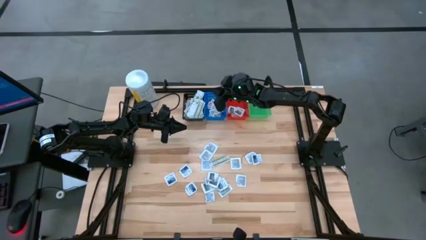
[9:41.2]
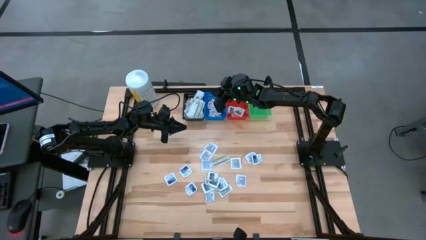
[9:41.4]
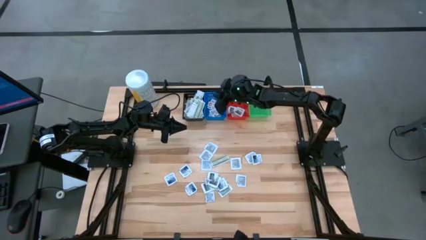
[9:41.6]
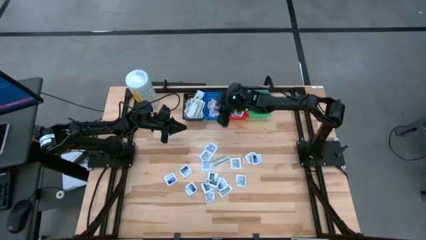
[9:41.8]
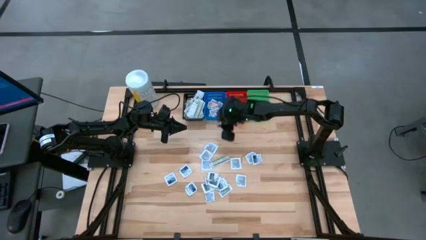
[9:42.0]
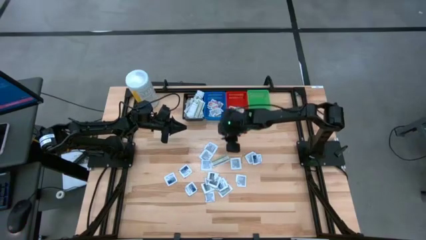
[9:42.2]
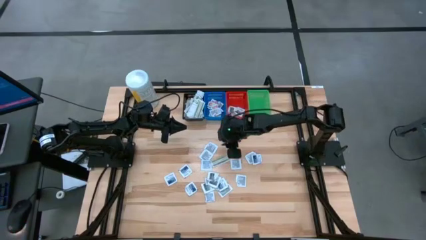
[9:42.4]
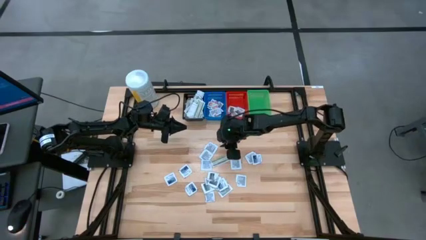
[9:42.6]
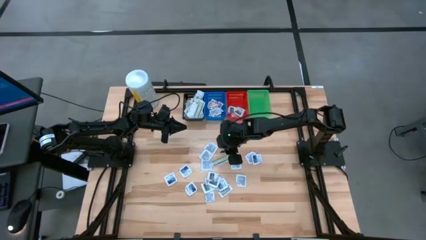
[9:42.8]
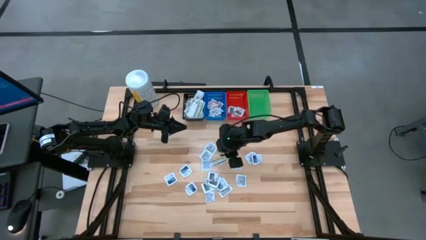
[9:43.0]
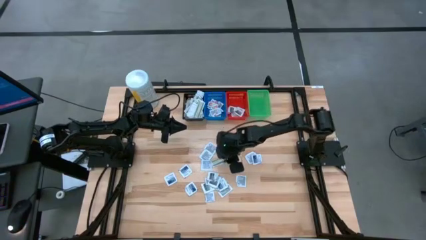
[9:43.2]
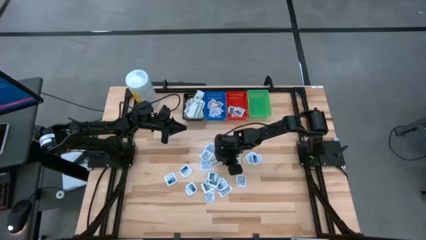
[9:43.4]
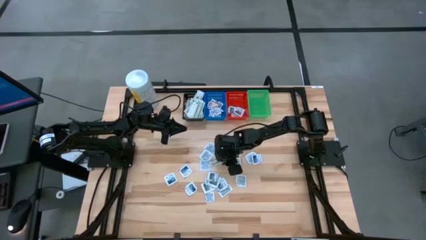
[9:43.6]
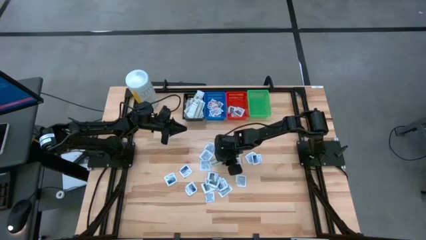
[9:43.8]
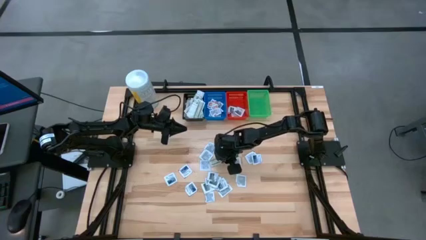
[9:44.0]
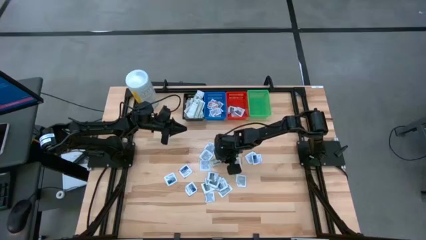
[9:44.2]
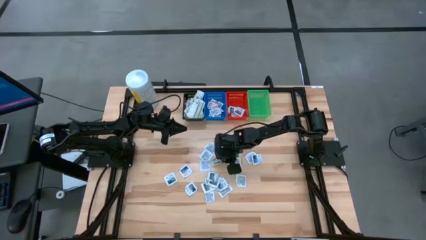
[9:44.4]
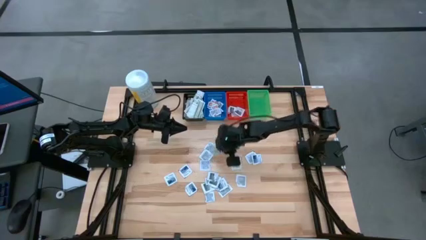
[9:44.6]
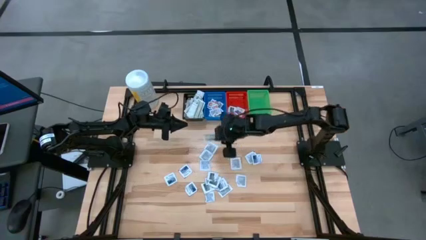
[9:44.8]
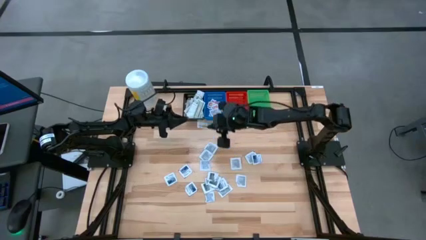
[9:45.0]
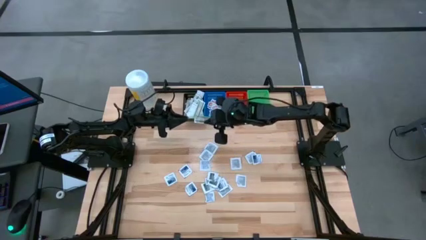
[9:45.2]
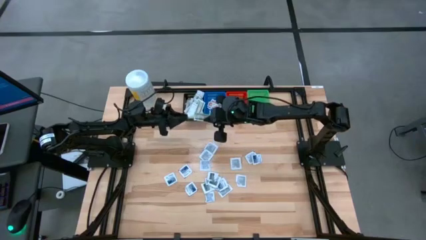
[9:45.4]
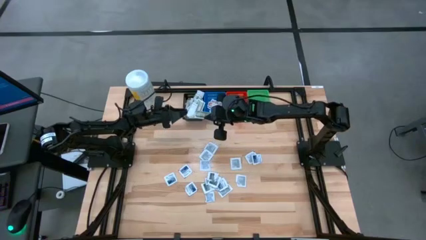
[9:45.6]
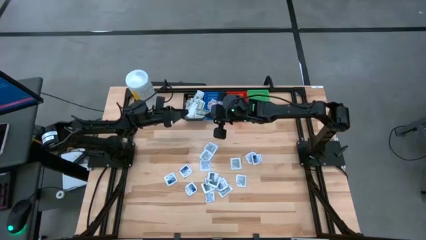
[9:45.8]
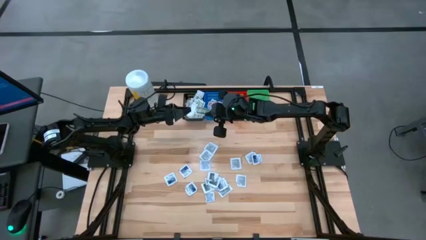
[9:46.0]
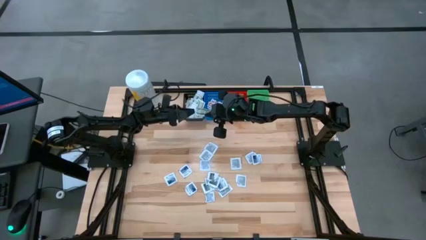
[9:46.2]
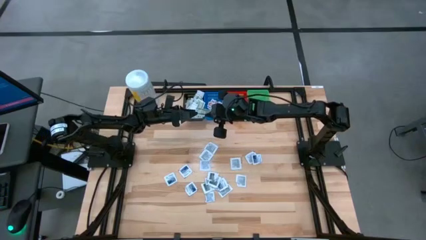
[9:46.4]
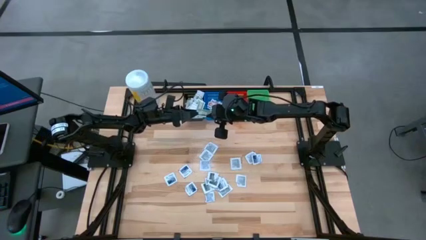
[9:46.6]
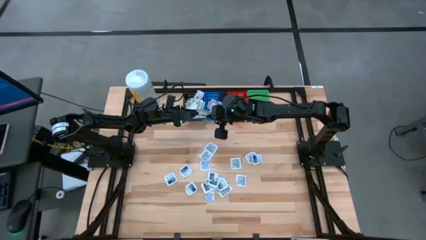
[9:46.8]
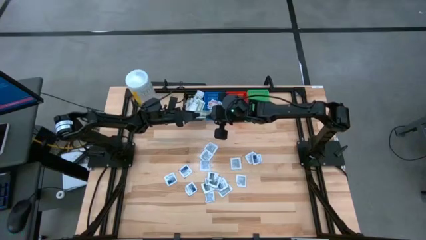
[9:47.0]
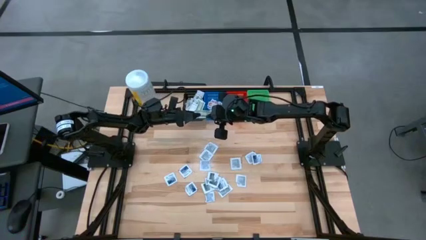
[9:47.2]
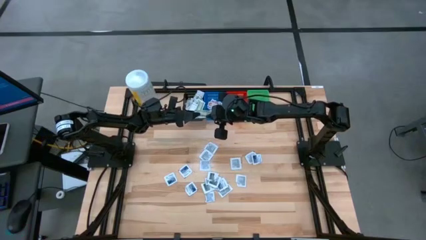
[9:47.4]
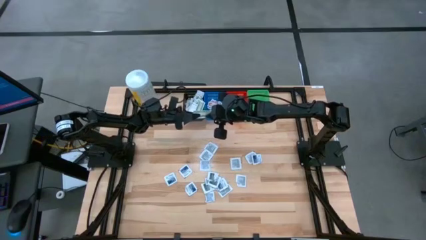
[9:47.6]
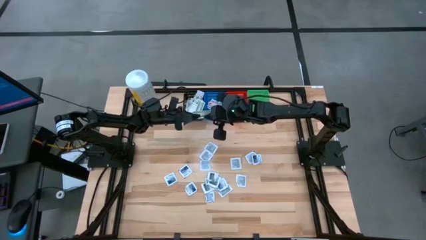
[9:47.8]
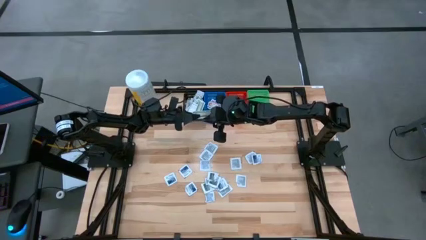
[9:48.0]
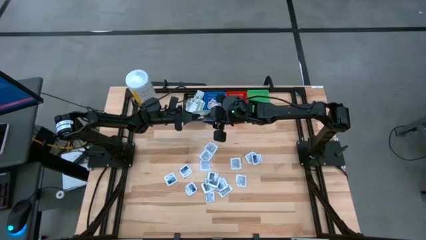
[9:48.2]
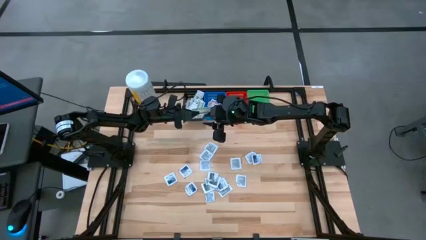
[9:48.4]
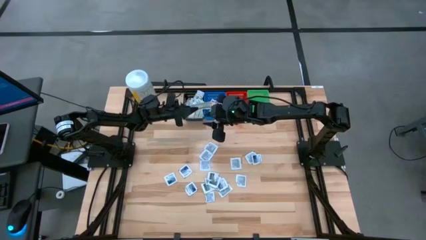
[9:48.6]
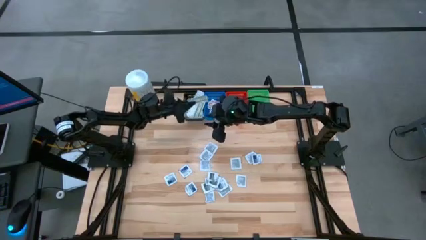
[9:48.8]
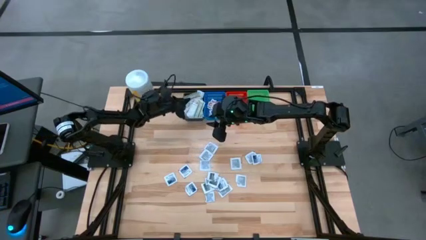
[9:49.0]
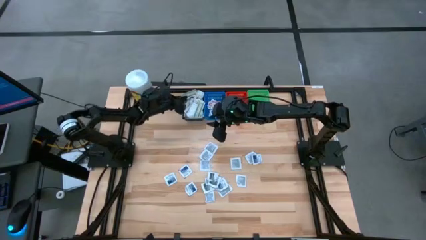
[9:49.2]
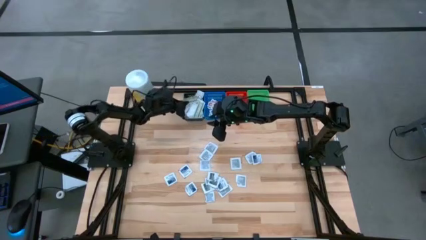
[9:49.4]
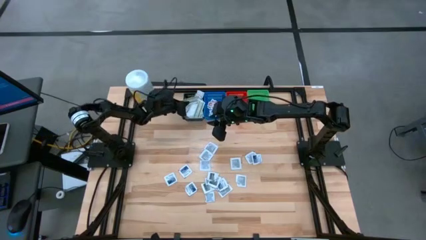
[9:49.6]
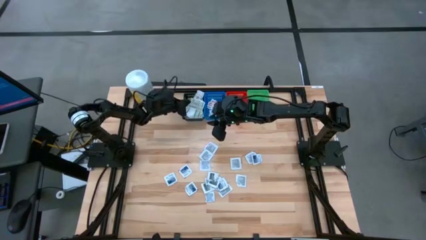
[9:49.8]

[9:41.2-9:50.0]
Task: Pick & Place First Aid Supplies
Put the green bandage pack in the black bin

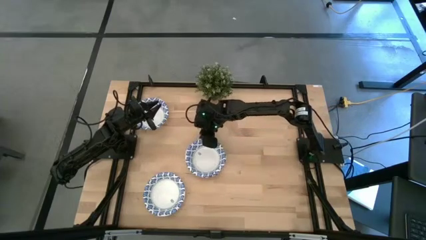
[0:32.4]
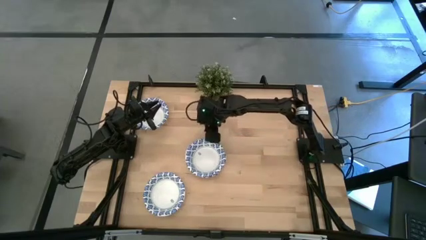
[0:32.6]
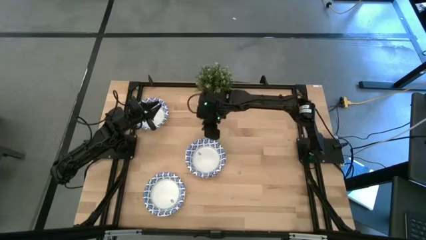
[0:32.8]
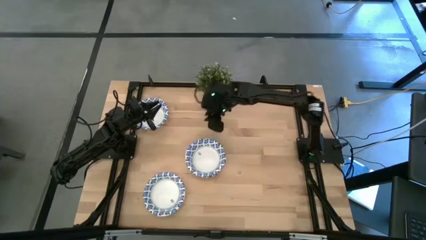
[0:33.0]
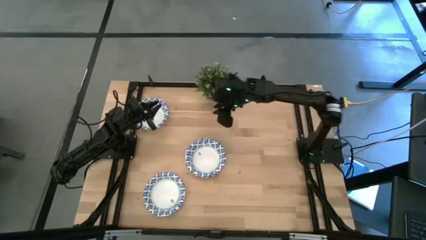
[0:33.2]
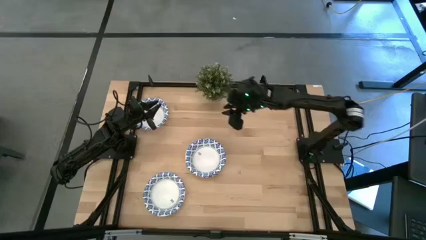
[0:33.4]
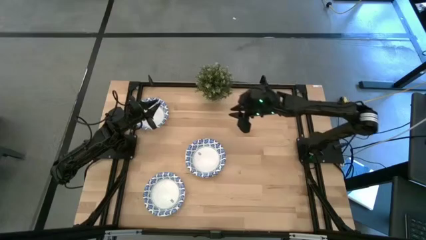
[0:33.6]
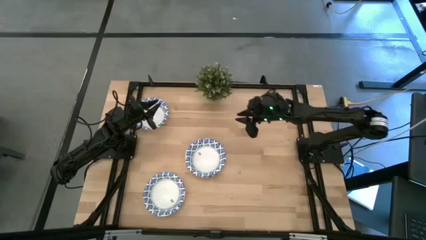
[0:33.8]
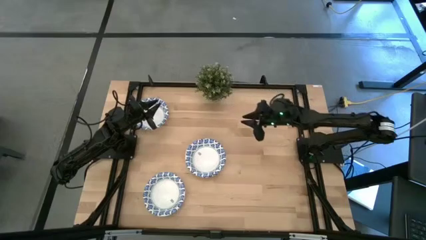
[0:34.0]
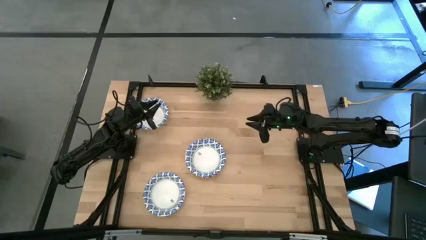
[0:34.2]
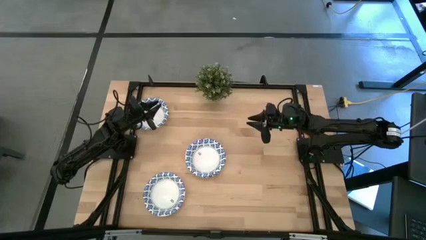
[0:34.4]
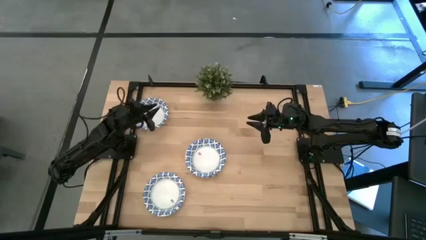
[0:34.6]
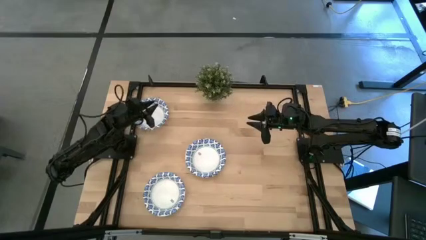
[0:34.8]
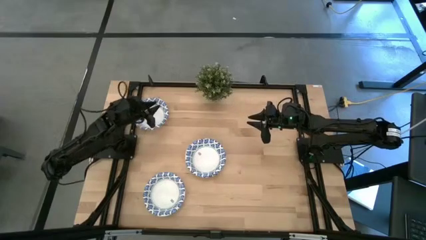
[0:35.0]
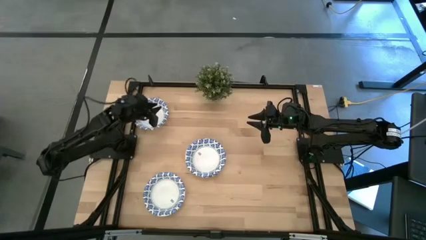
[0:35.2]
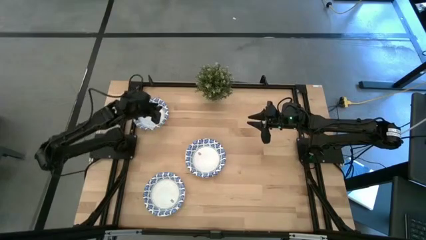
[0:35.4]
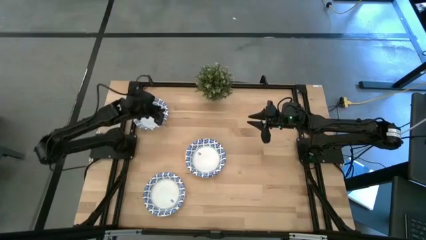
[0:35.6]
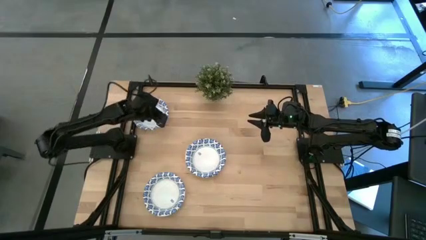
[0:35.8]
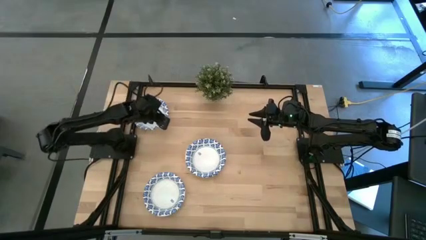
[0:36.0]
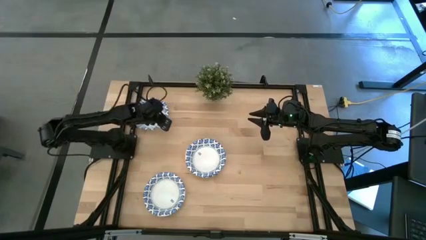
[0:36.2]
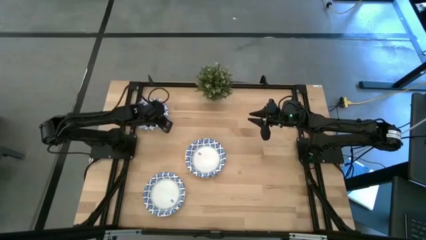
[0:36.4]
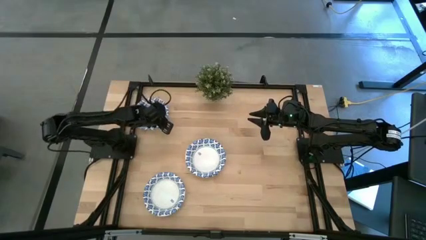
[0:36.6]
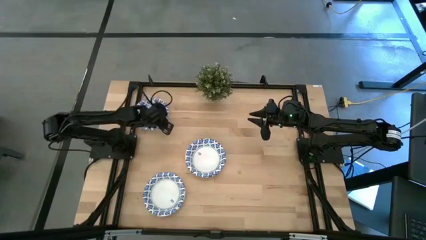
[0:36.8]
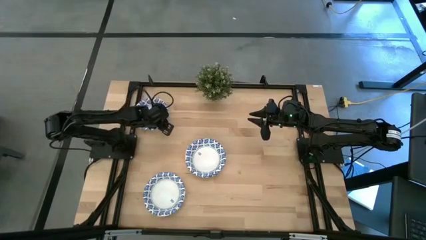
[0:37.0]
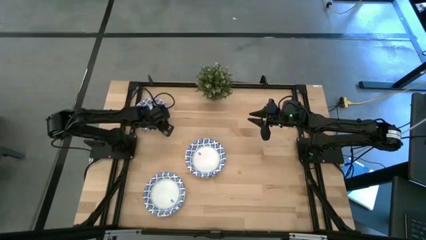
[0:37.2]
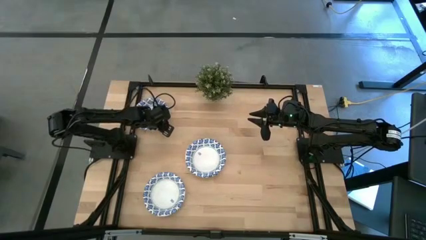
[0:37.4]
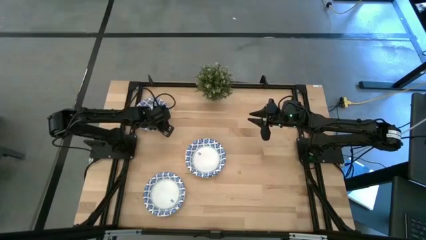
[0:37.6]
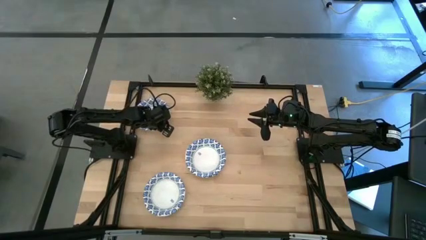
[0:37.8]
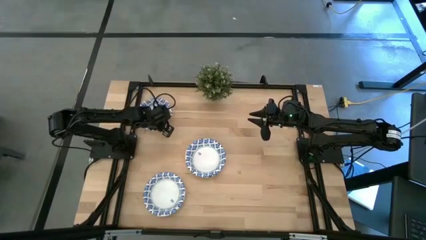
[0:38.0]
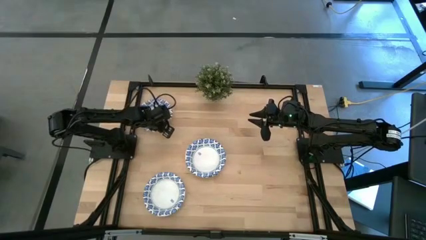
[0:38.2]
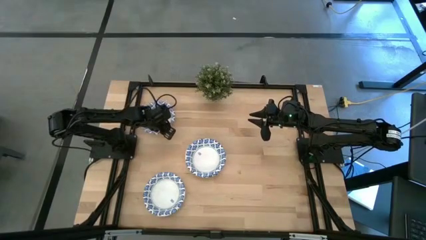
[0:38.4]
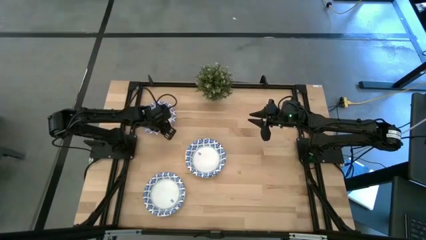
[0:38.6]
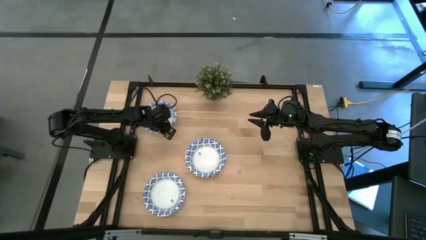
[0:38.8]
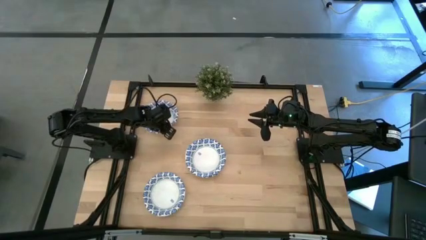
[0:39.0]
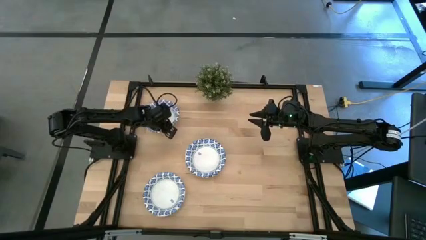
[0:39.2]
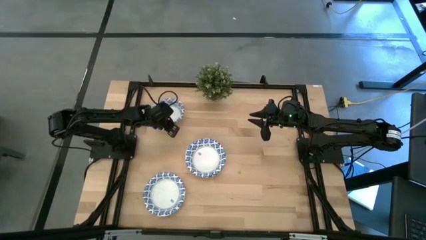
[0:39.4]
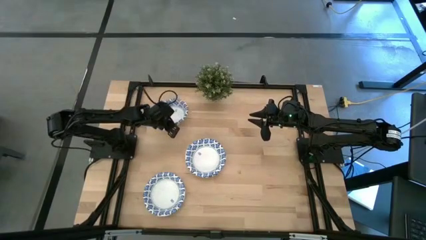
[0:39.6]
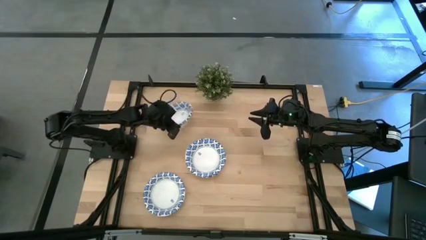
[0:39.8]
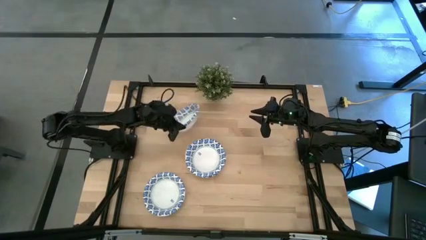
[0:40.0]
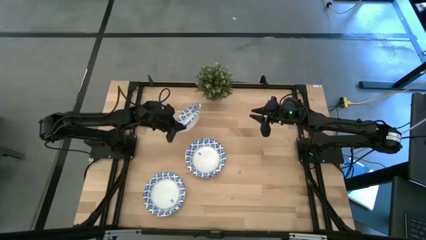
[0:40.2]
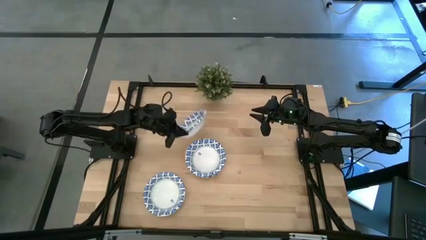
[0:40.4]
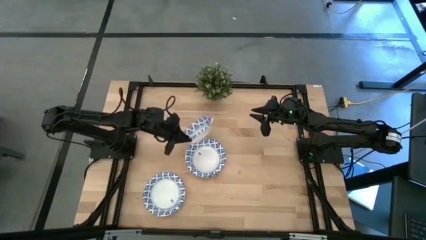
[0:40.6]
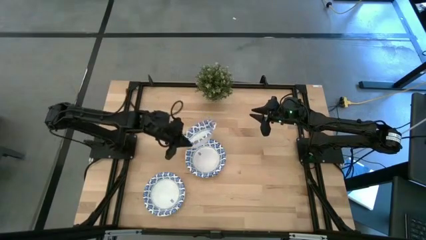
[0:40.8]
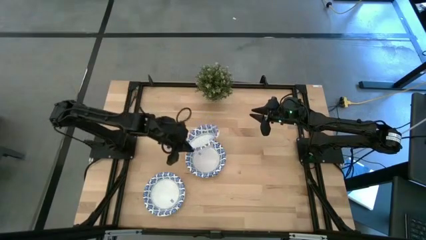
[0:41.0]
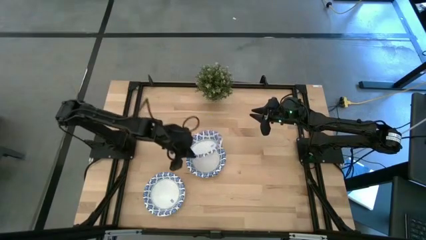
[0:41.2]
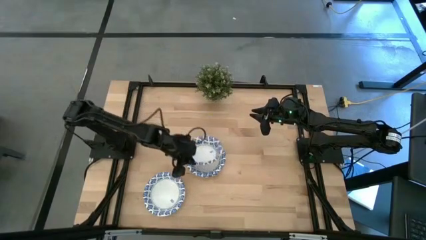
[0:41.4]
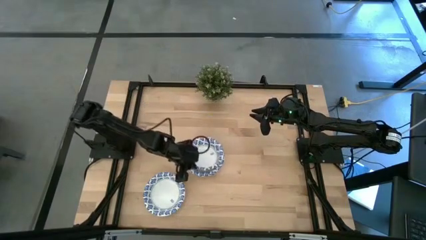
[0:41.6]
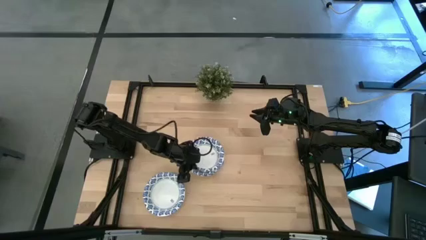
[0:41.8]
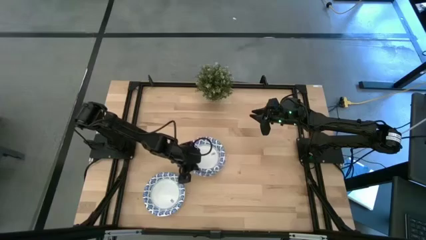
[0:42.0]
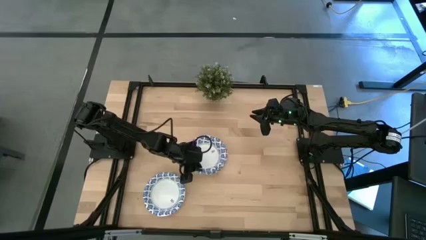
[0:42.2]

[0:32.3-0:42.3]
Task: Nest bowls inside each other
Stack the white bowl on the stacked white bowls
